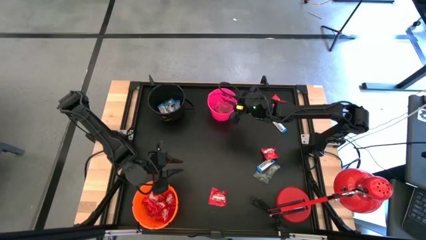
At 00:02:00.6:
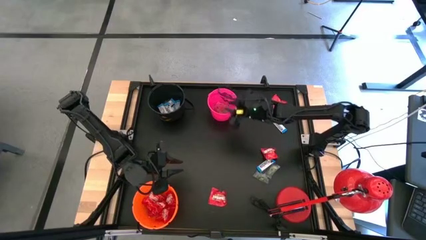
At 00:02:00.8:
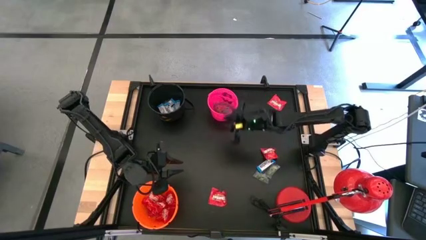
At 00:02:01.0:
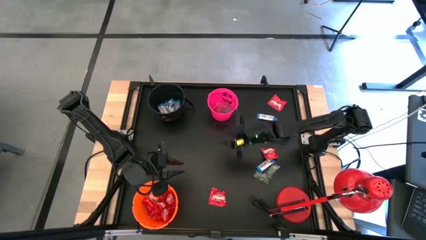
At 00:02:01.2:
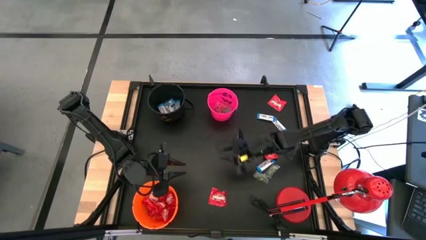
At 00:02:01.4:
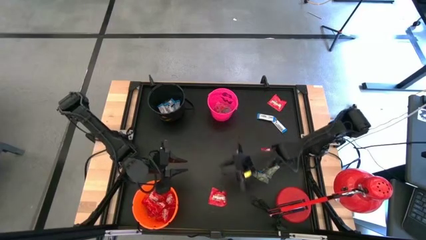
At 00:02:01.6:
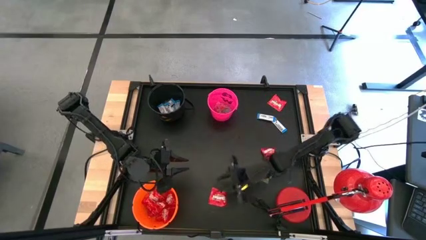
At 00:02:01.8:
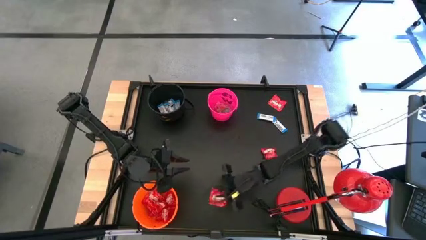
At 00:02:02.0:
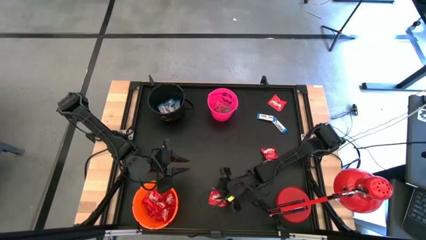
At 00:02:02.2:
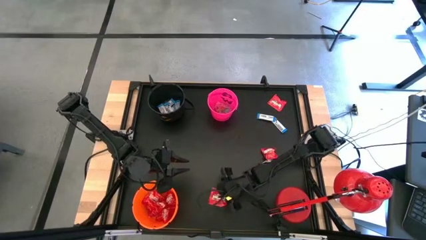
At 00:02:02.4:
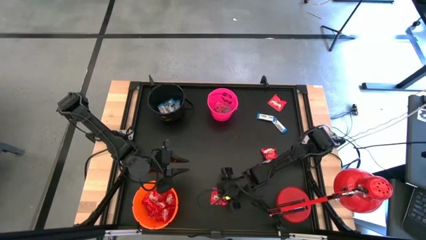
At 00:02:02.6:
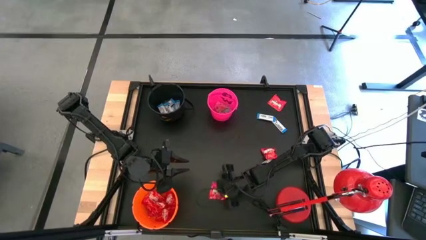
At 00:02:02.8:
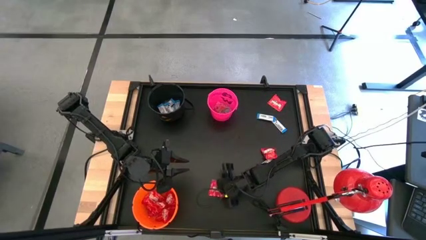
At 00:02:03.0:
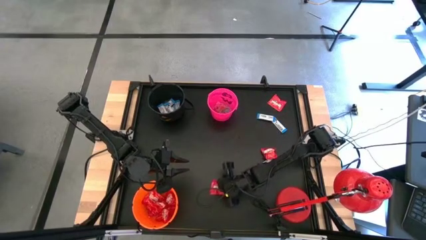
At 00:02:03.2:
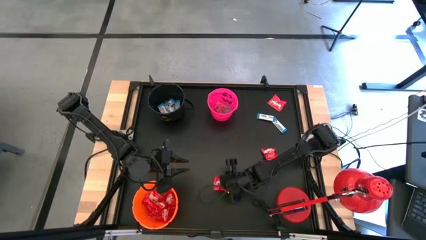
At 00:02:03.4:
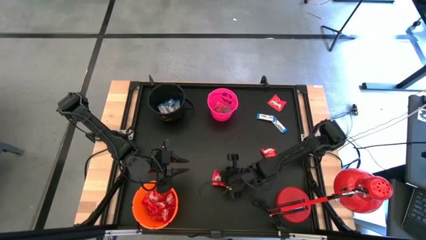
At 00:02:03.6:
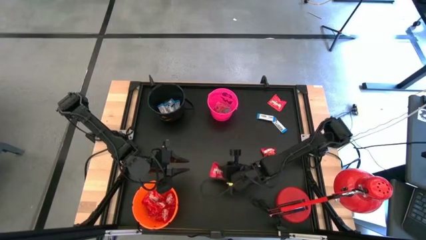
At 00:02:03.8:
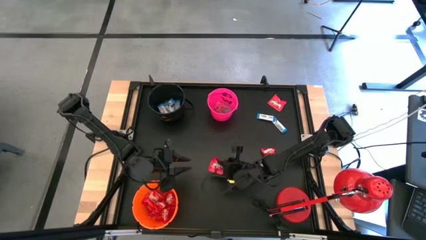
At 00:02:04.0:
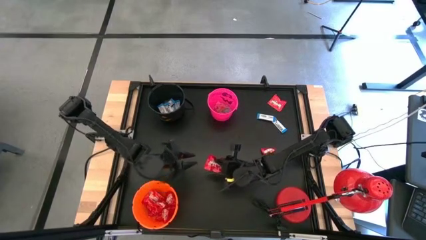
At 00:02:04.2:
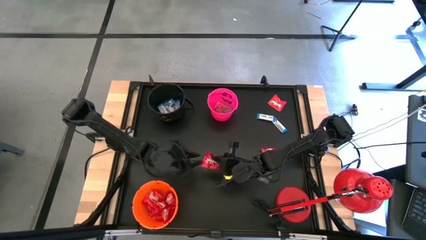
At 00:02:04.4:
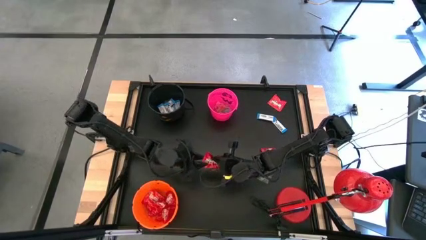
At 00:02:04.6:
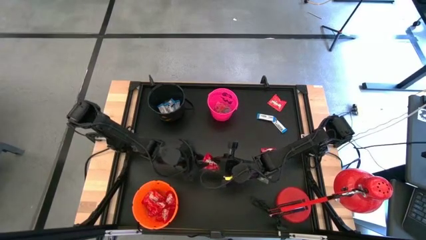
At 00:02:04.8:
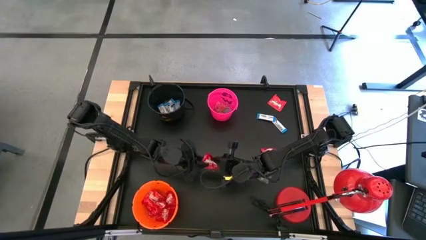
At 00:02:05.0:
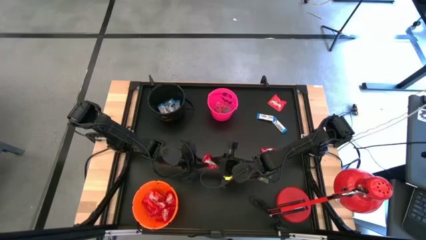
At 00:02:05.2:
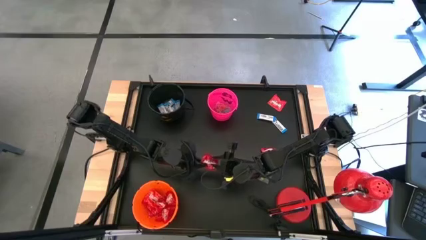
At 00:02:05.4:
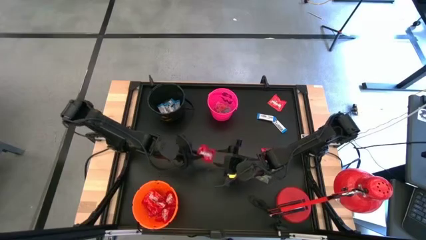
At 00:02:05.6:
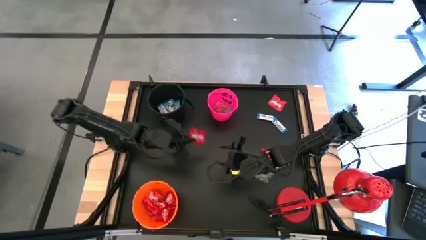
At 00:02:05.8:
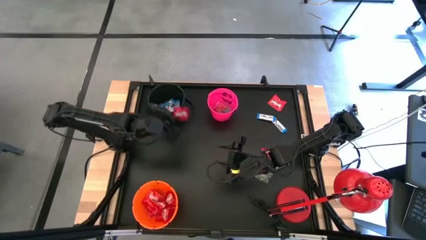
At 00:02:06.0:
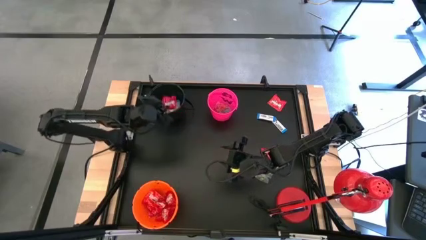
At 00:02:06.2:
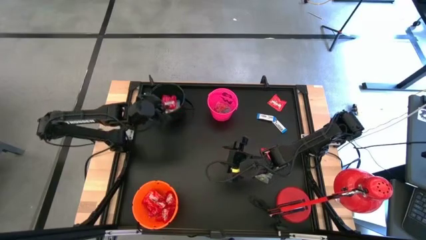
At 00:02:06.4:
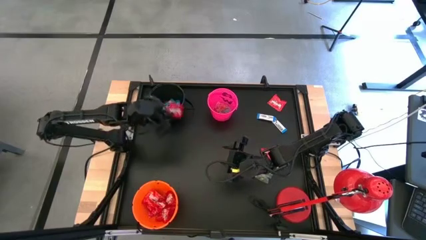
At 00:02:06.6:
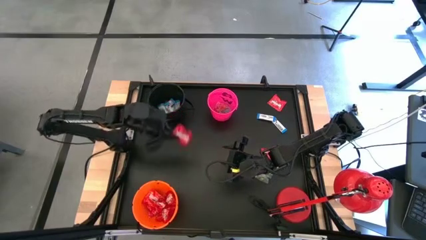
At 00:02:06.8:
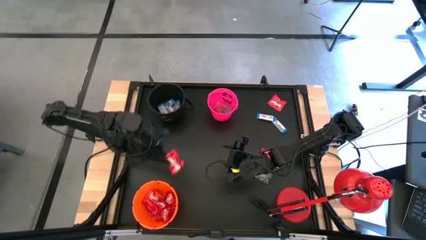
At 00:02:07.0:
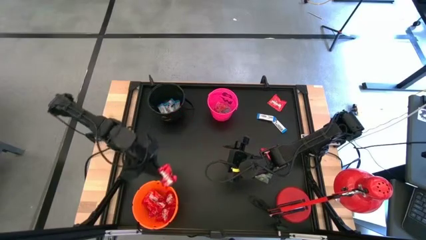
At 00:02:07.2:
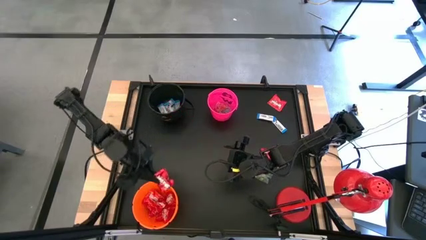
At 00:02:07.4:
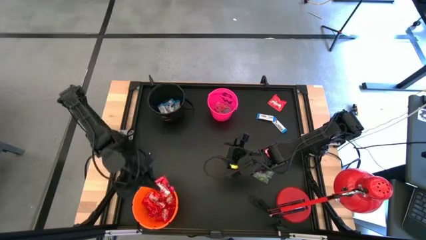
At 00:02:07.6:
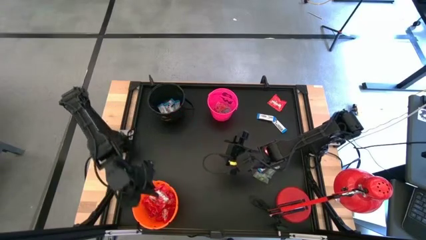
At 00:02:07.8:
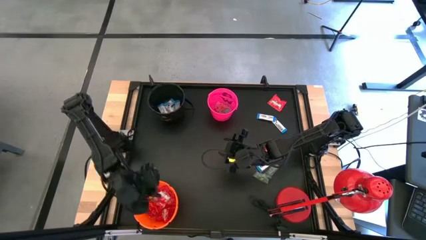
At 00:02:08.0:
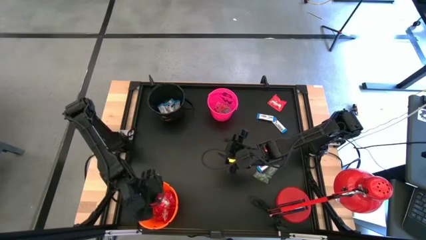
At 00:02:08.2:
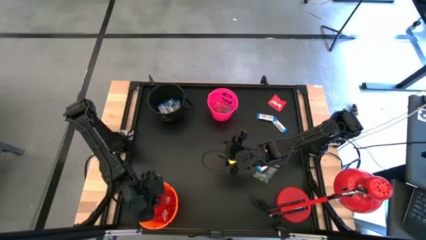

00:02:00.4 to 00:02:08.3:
Task: Organize candy in baskets
Put the red candy into the orange bucket

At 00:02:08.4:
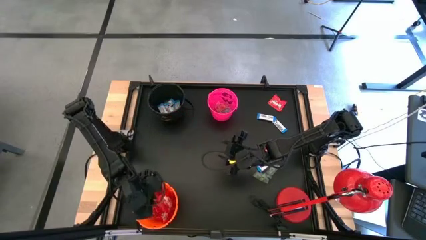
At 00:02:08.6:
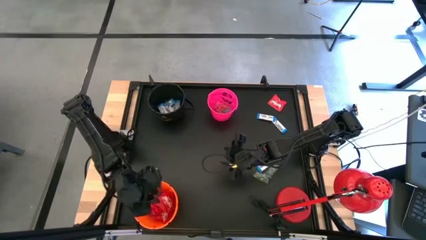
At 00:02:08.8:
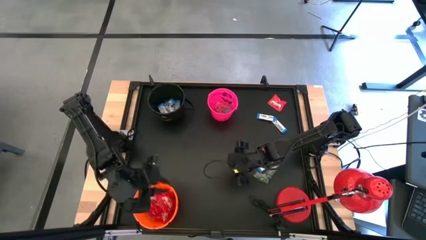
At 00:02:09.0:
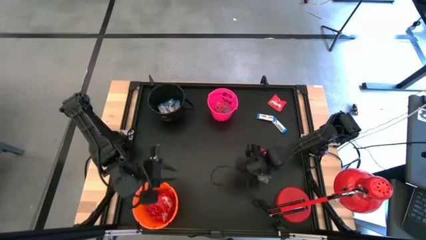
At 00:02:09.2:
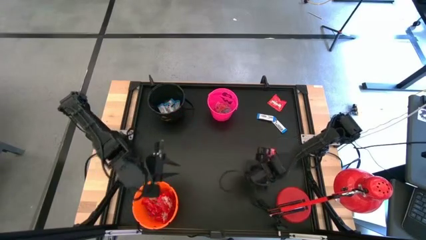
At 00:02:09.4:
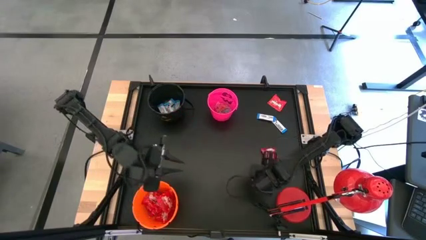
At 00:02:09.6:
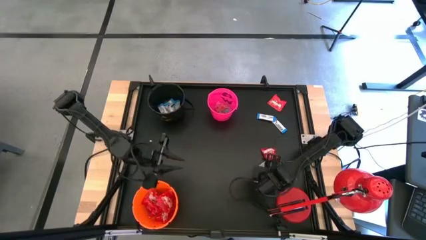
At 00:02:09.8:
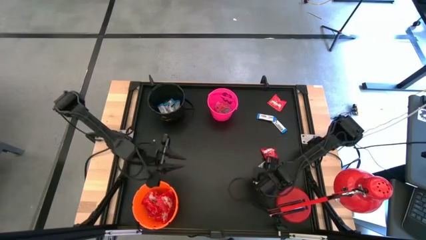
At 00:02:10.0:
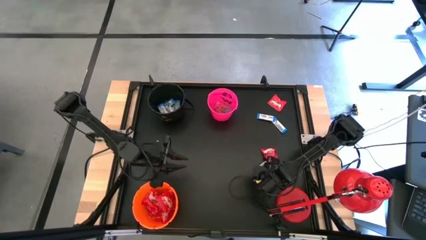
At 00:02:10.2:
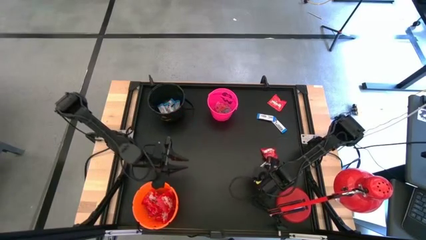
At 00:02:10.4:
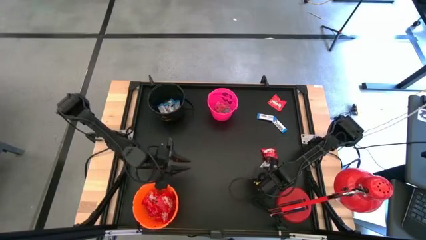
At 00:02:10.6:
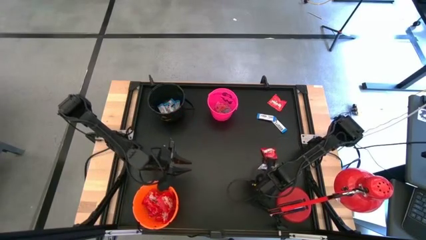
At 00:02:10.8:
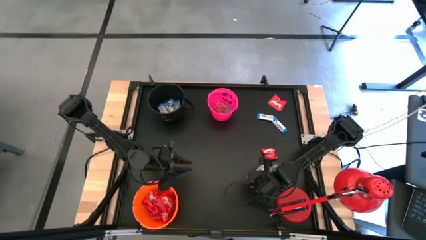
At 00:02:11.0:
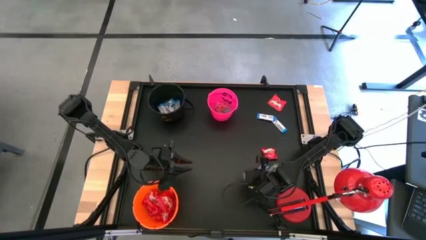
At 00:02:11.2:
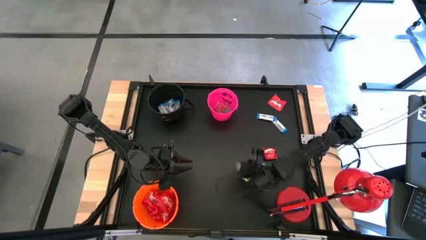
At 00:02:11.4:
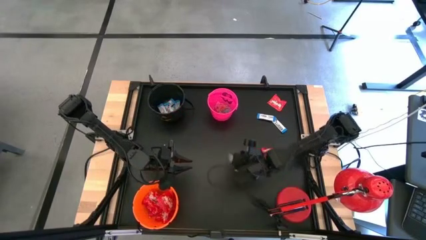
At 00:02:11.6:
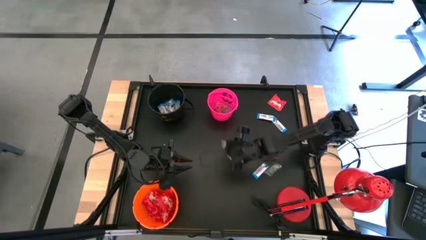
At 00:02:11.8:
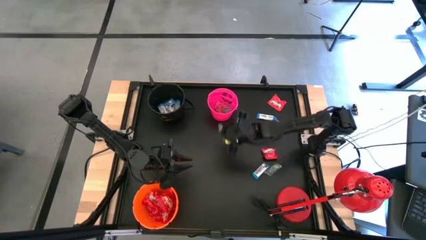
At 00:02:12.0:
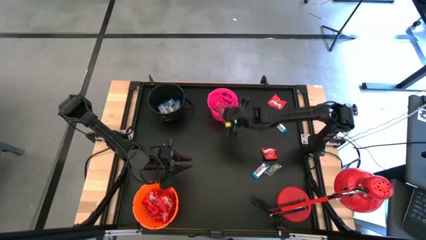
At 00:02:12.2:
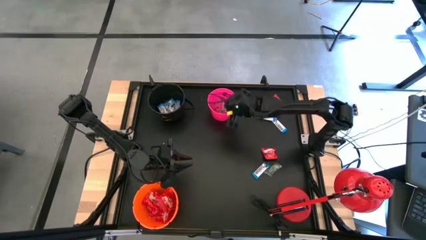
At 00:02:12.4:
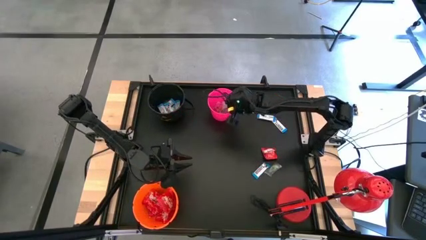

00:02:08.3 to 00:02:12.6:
Put the green gummy into the pink bucket

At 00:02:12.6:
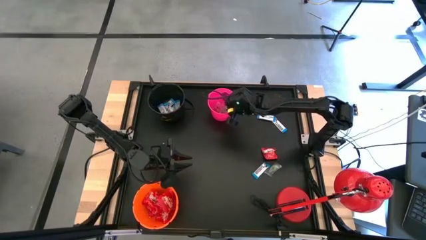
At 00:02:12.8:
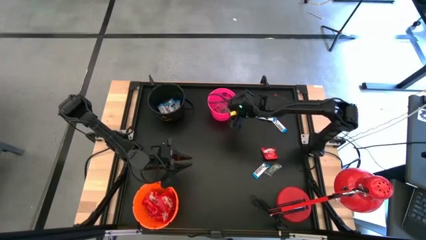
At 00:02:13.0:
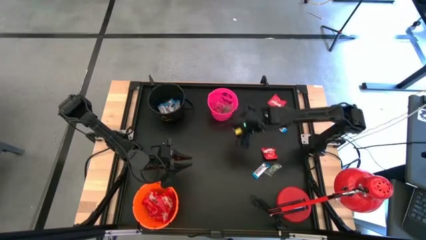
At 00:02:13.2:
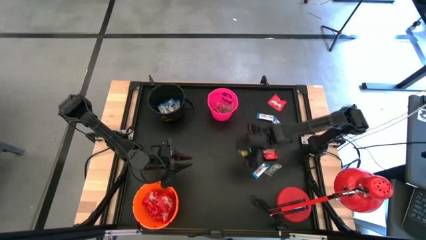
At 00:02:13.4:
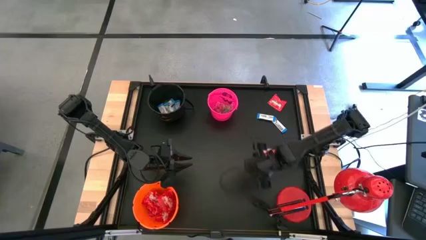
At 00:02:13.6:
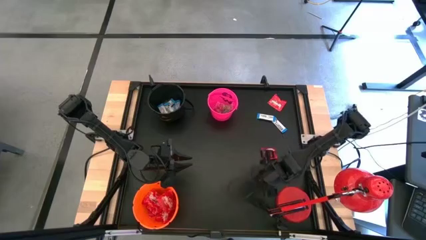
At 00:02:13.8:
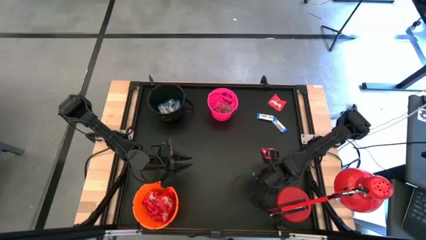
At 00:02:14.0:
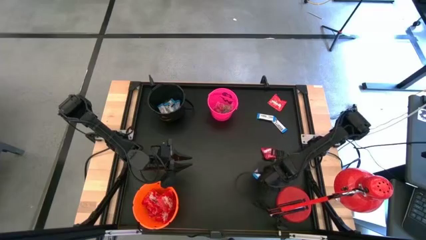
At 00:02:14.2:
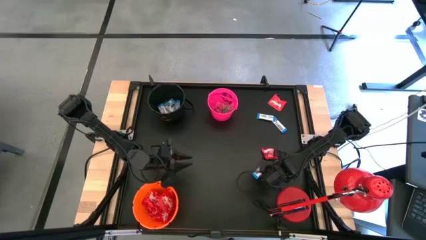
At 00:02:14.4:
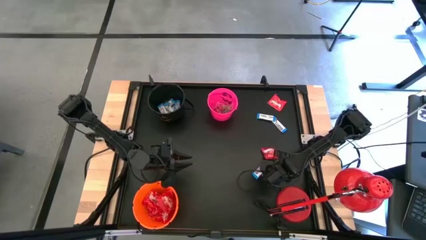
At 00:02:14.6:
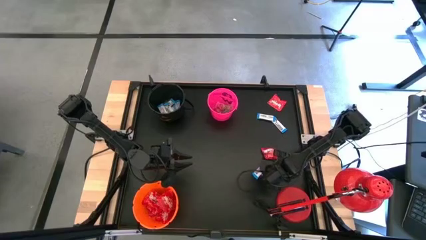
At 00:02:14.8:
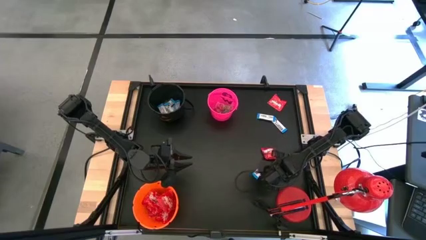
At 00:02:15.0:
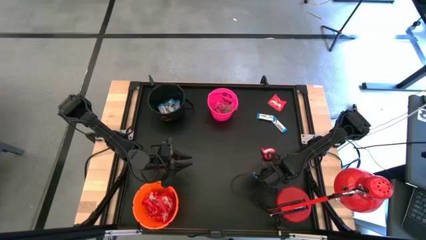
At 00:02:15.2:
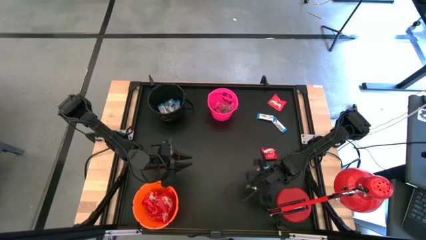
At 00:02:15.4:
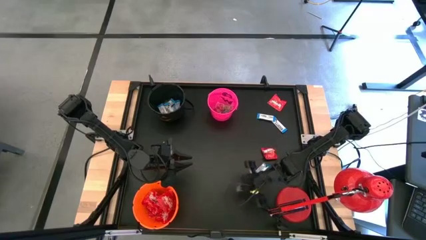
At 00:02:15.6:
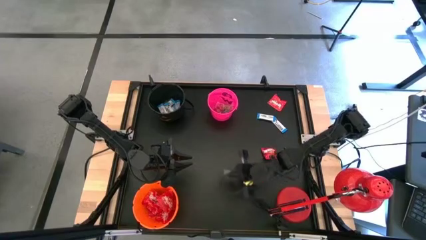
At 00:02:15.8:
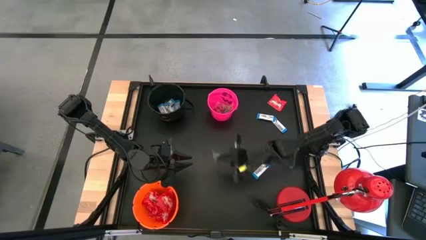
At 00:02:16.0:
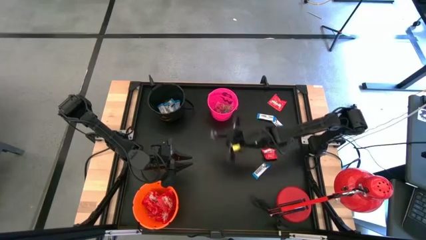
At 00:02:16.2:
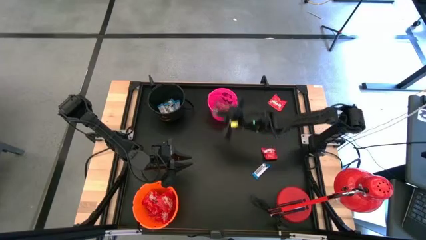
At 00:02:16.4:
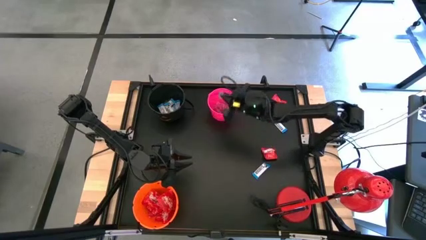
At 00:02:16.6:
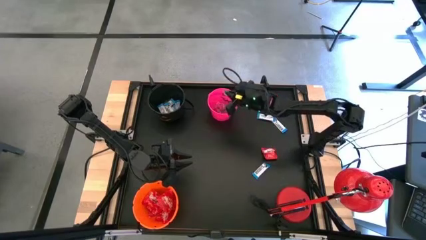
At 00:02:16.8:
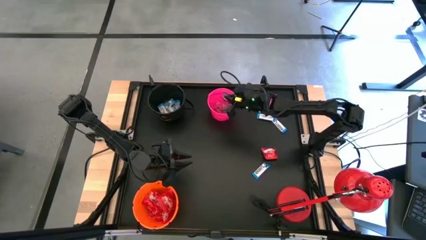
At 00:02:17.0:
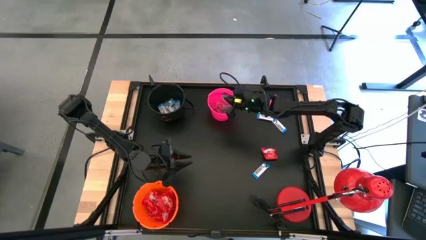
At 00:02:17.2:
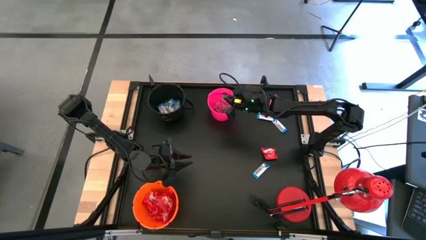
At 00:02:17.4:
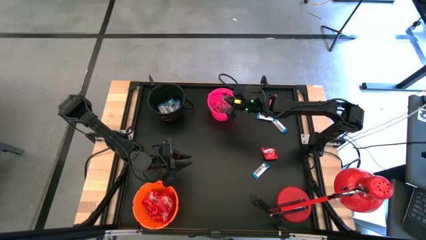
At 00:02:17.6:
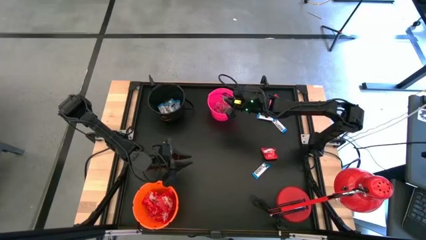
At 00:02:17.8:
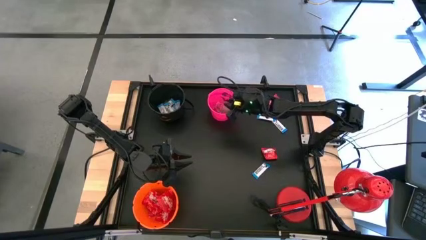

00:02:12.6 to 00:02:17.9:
Put the green gummy into the pink bucket
